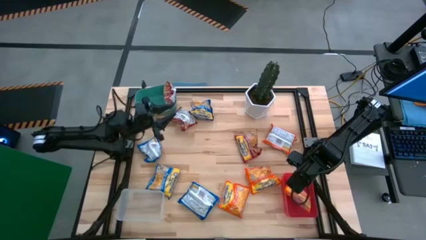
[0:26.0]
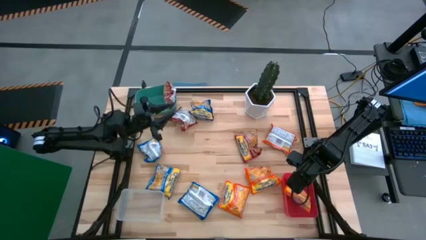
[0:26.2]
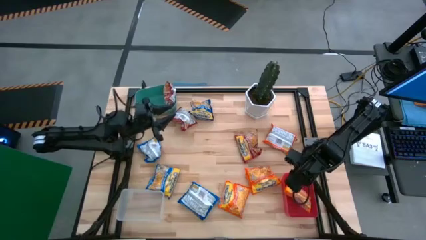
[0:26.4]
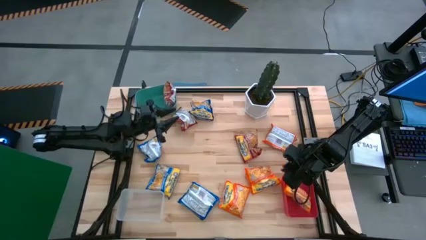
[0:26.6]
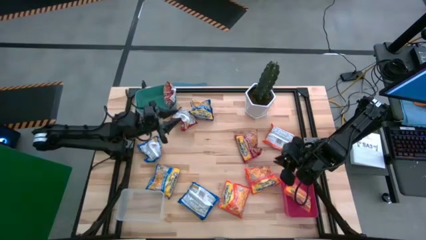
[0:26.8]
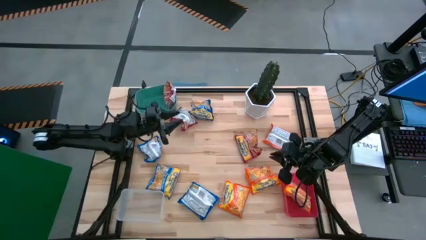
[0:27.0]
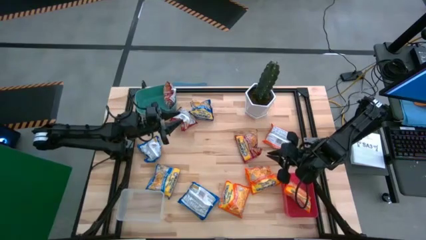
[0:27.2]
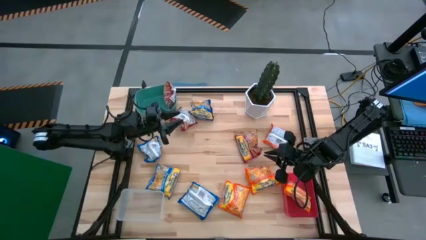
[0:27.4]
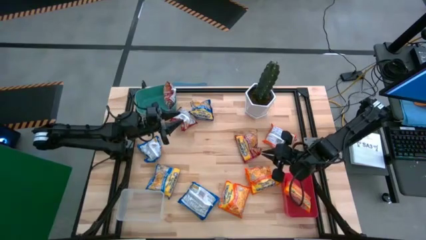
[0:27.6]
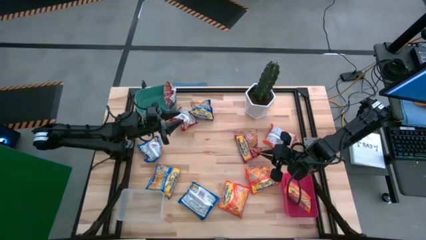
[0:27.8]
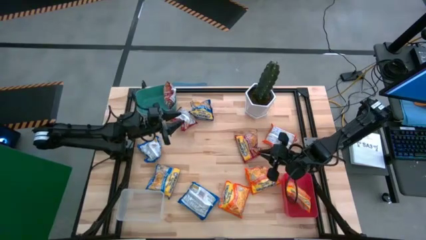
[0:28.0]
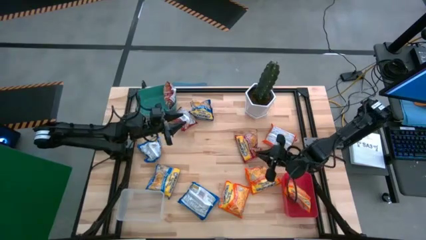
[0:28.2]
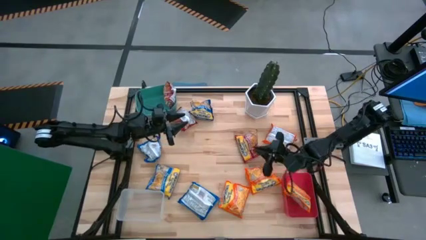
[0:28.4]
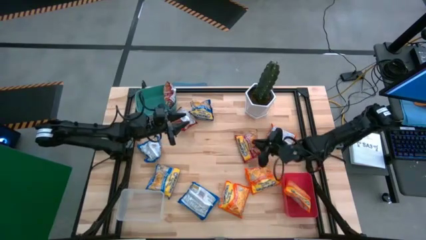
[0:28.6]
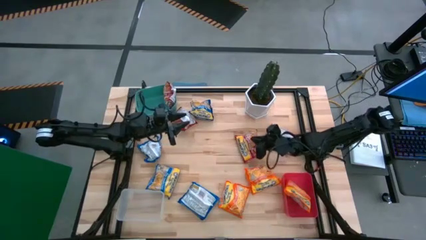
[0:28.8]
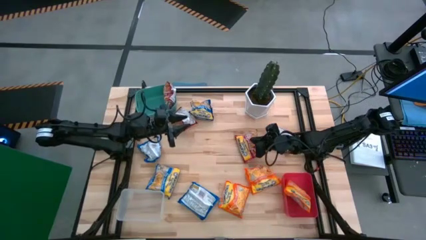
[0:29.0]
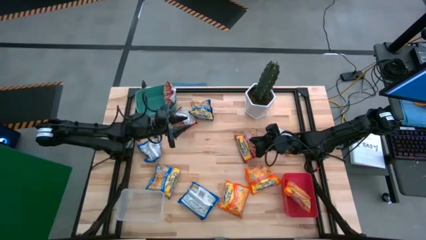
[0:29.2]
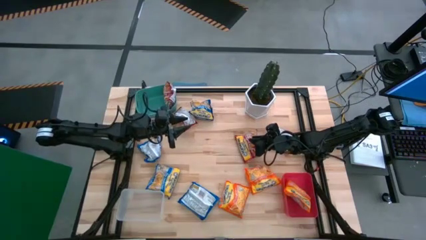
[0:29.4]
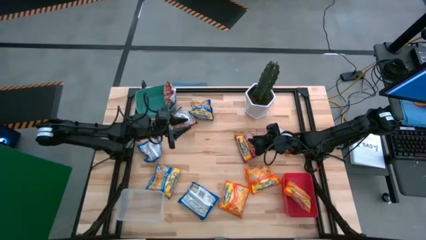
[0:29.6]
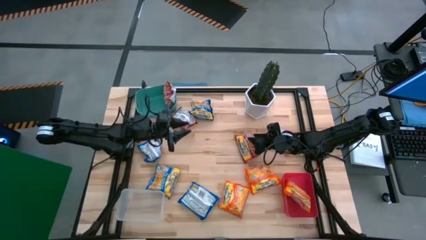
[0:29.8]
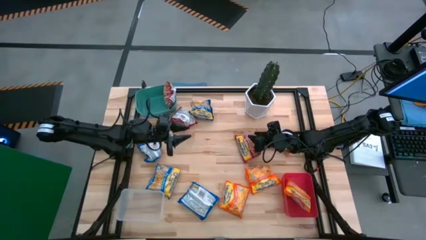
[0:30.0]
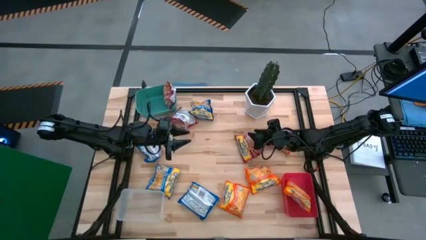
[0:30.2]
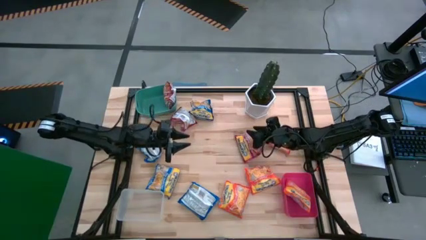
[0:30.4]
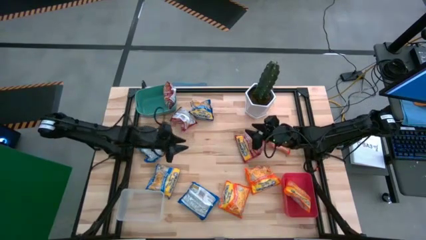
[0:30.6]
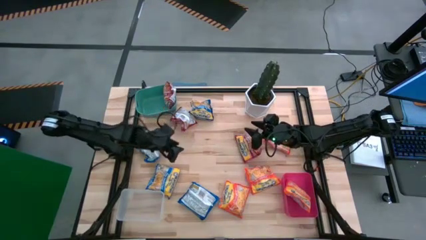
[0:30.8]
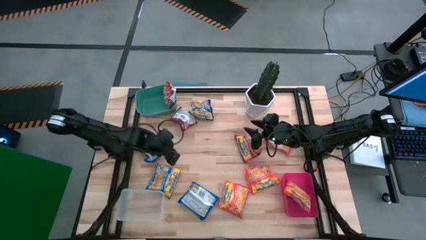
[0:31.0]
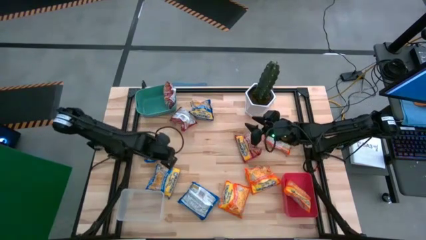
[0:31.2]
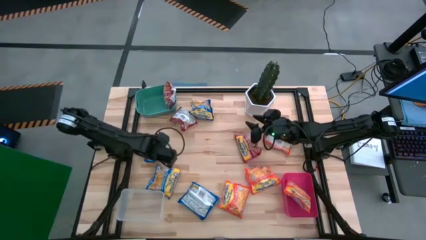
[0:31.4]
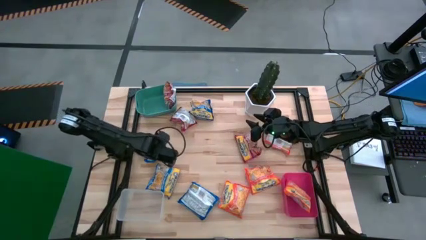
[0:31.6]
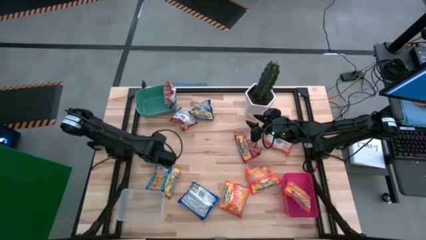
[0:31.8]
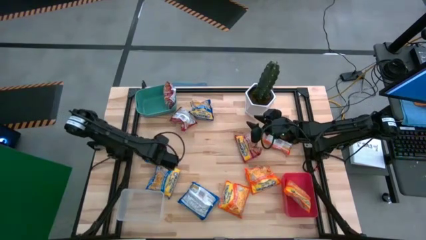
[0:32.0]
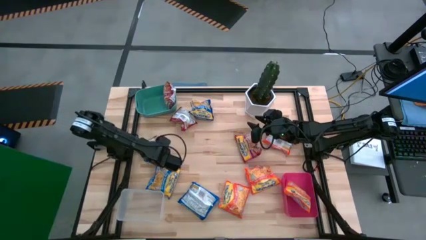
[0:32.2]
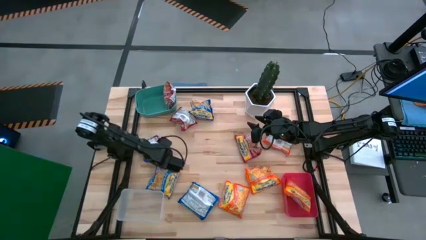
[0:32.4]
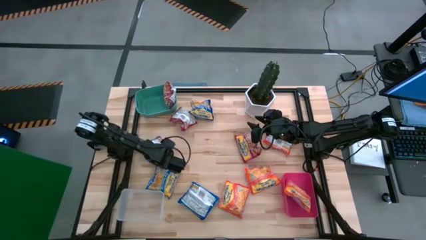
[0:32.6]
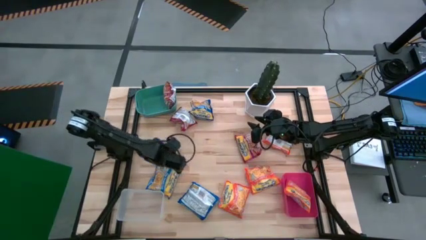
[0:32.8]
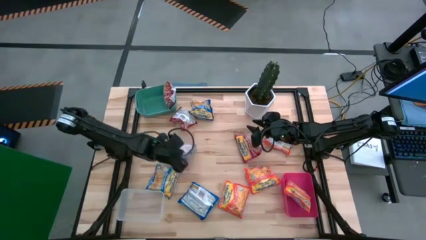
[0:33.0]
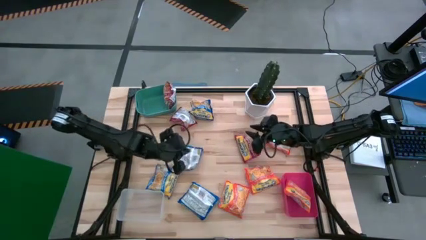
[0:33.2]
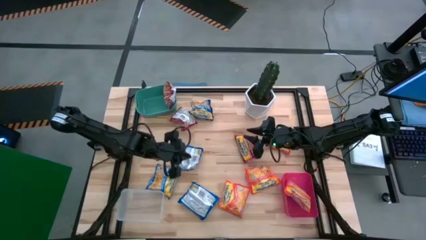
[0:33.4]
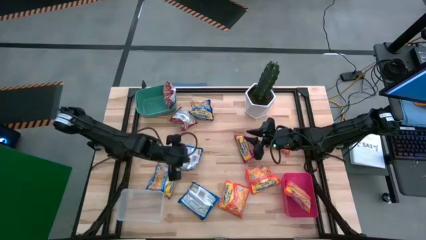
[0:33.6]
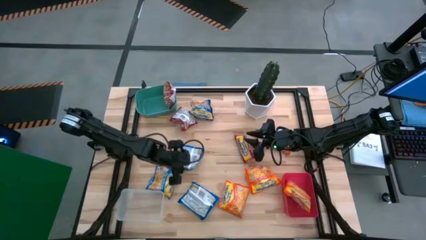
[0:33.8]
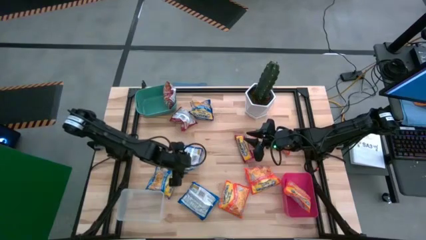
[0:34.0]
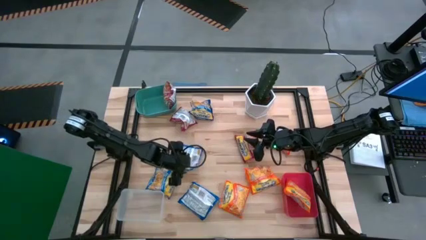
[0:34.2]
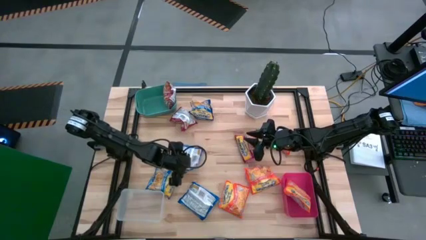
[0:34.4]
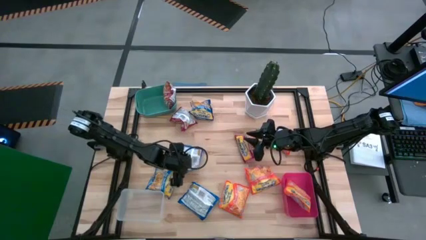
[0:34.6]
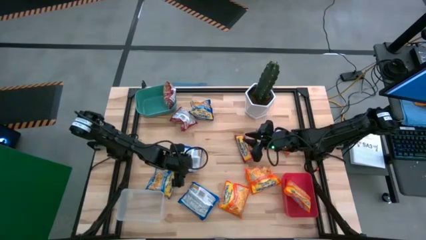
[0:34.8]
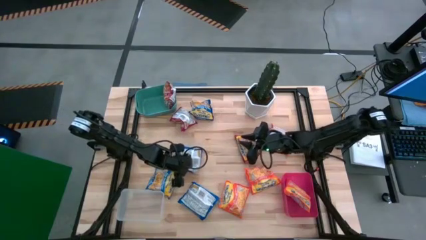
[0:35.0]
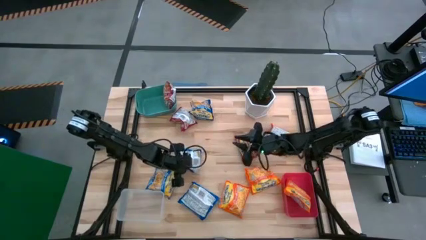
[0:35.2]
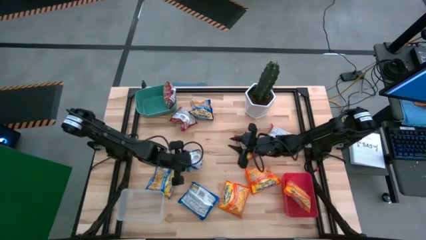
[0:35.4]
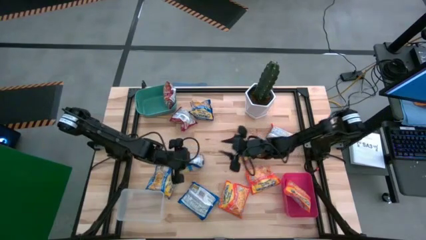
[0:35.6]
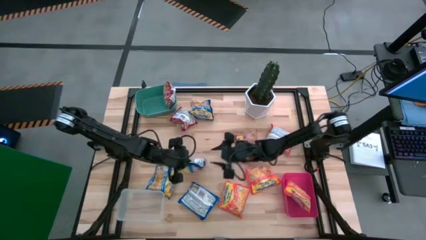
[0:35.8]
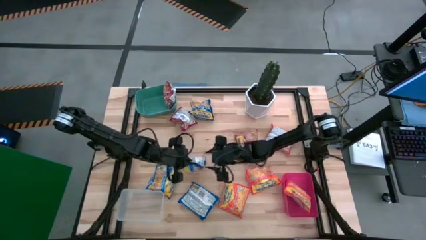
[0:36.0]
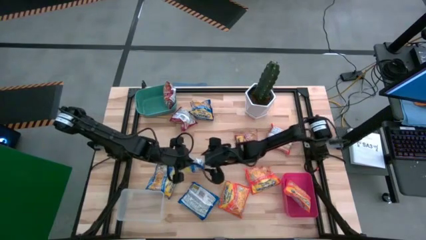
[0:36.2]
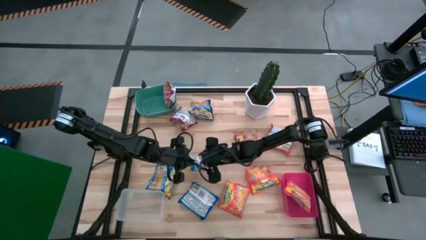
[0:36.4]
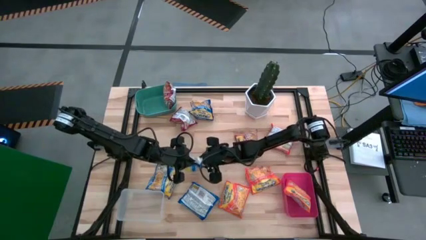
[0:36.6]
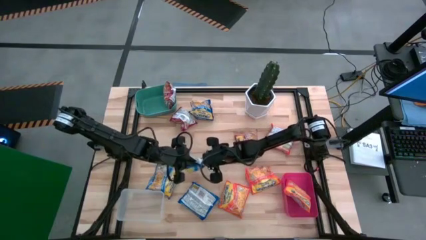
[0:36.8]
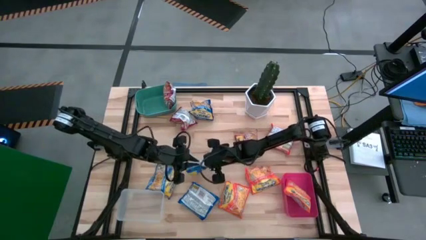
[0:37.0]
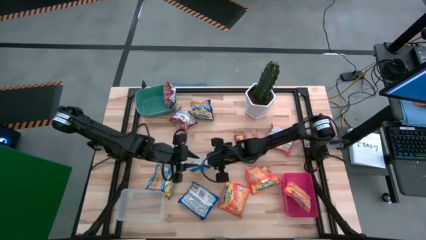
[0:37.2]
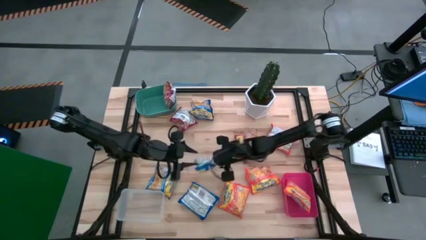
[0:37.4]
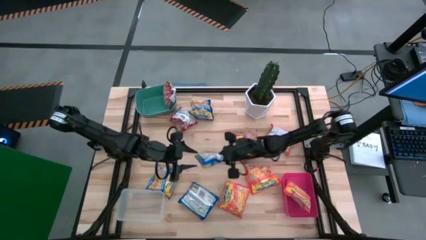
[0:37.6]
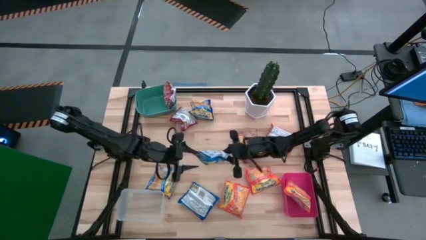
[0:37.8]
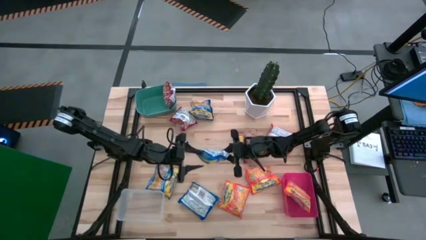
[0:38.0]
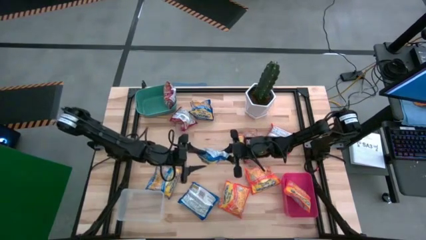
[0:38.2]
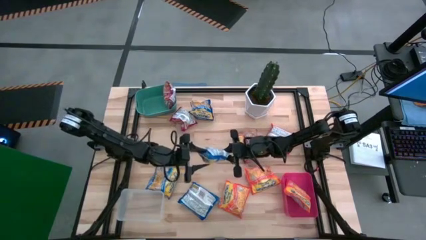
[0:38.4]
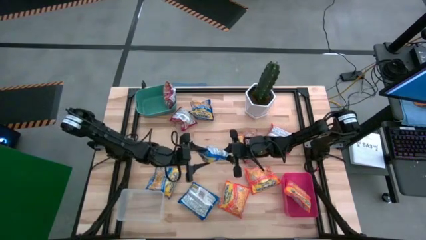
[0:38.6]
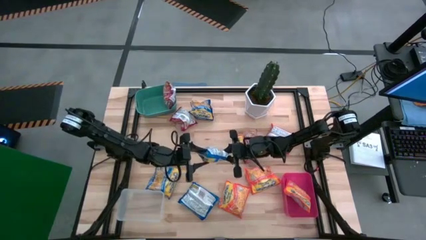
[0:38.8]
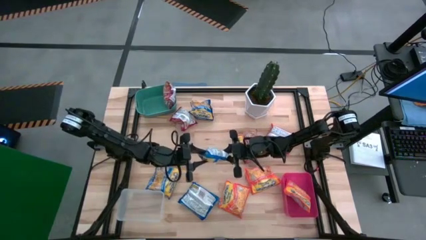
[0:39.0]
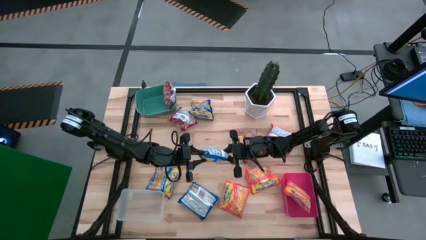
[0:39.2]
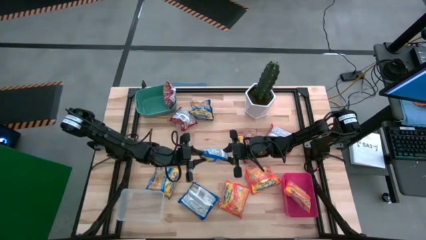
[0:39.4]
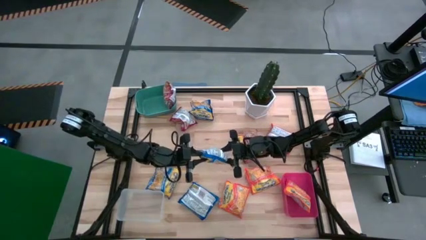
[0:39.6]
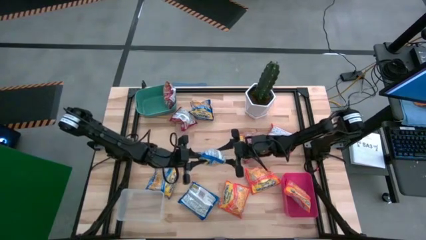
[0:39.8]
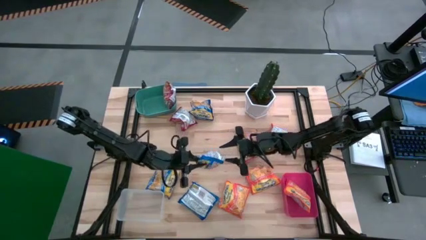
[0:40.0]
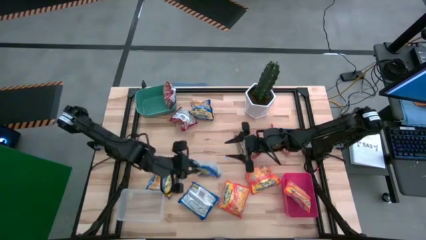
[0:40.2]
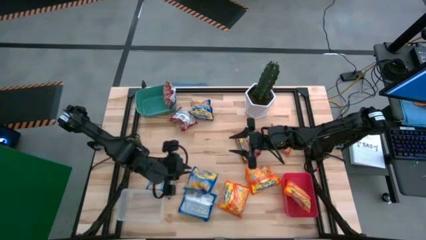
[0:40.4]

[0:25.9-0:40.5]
Task: Sort Maruchan noodles
Put the middle left blue noodle pack into the transparent bin

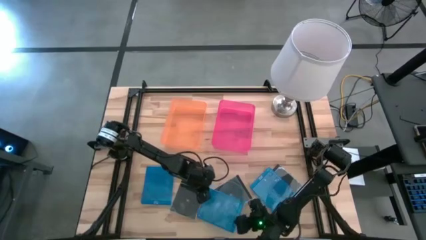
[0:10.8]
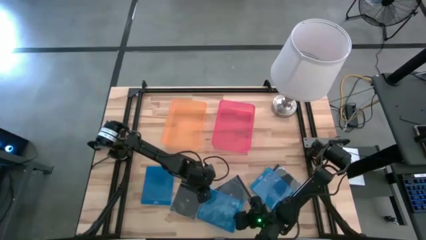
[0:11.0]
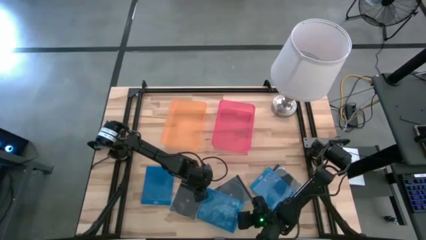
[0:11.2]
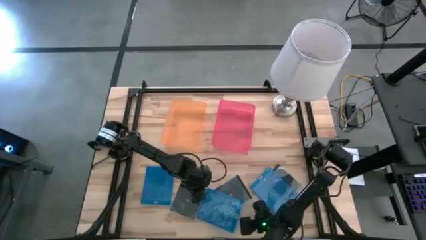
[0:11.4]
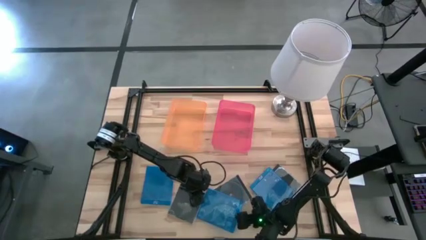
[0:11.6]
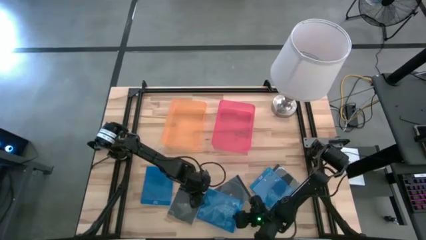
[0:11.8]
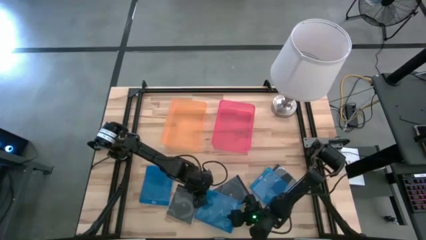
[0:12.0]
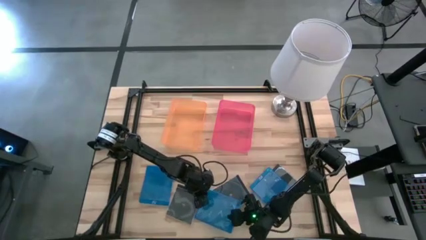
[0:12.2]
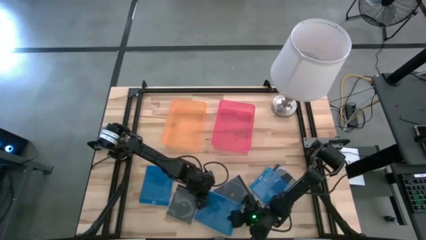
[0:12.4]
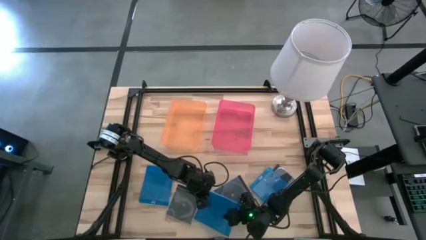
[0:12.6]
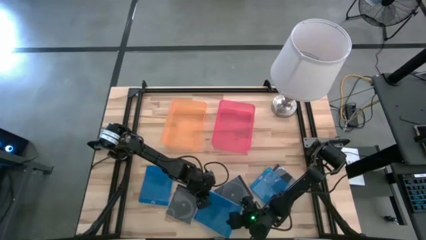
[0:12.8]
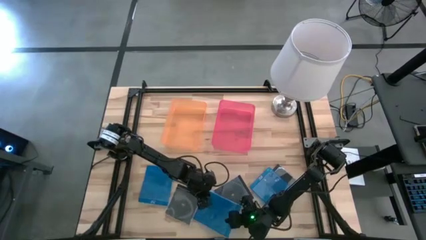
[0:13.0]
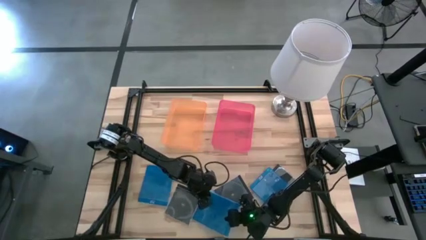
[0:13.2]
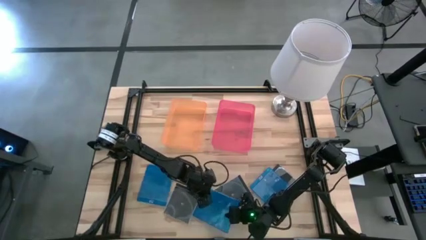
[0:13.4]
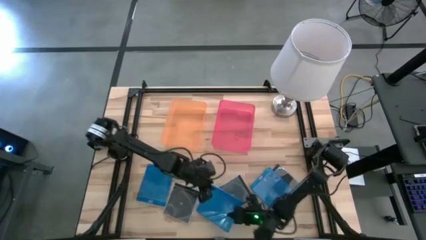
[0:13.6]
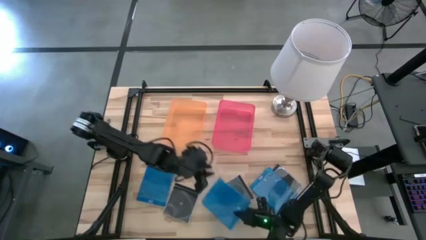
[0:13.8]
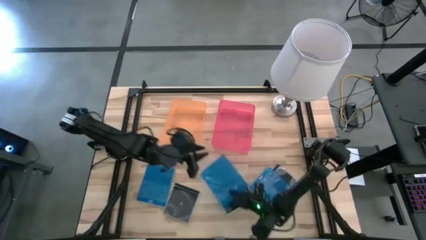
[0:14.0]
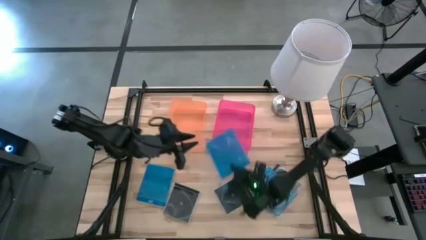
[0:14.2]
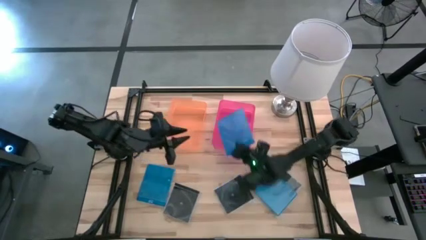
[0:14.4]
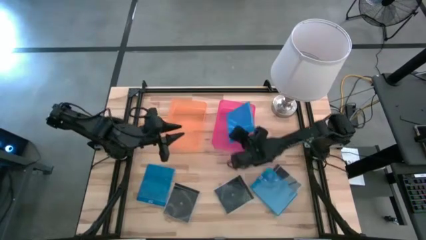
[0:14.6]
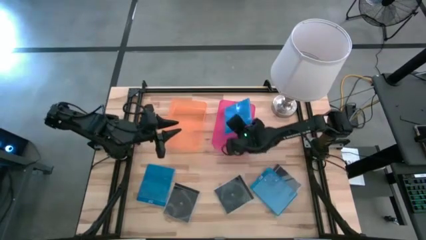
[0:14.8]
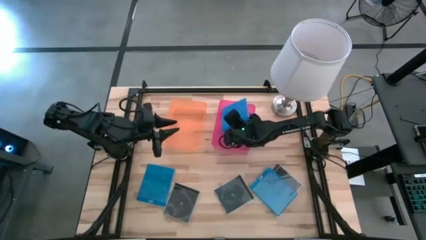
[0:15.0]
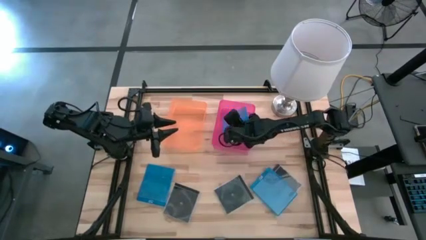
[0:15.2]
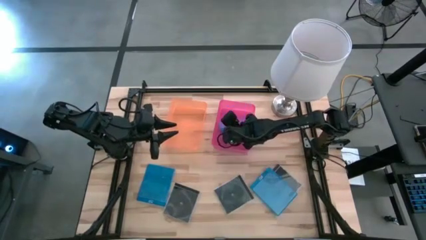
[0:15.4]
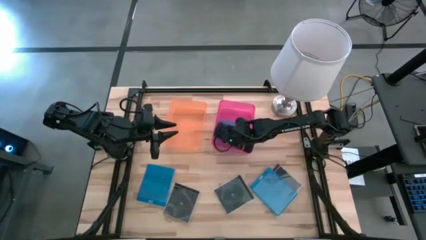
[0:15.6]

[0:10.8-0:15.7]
Task: Pick & place jewel cases by type
Put the middle blue CD case into the pink bin
